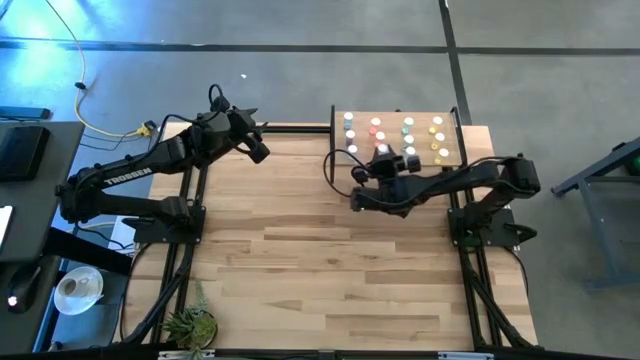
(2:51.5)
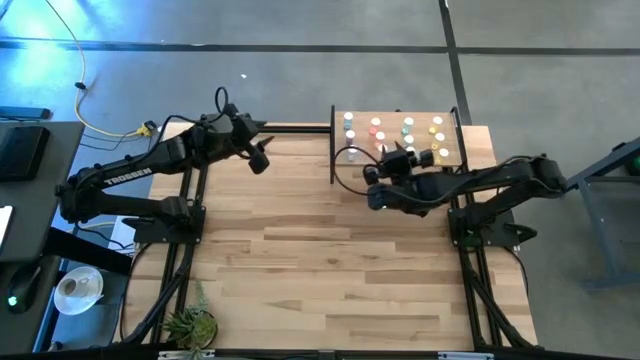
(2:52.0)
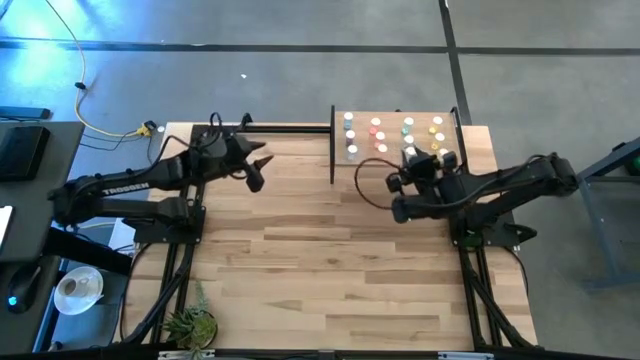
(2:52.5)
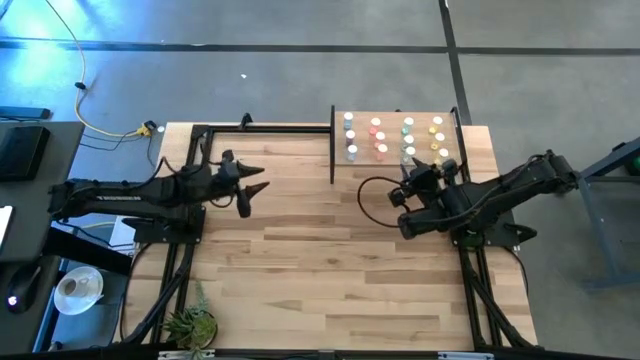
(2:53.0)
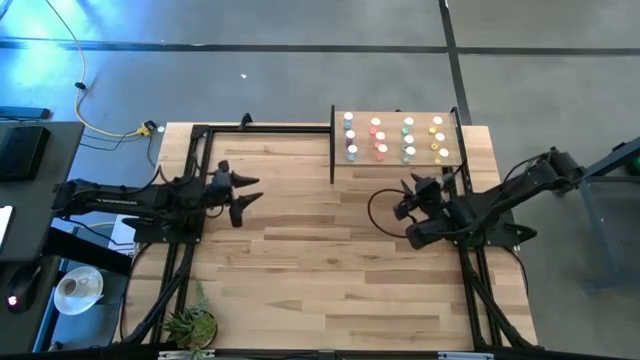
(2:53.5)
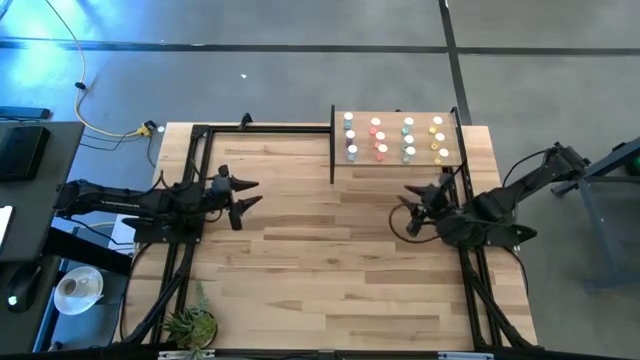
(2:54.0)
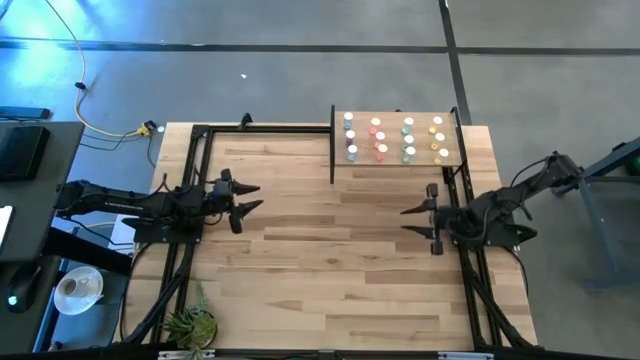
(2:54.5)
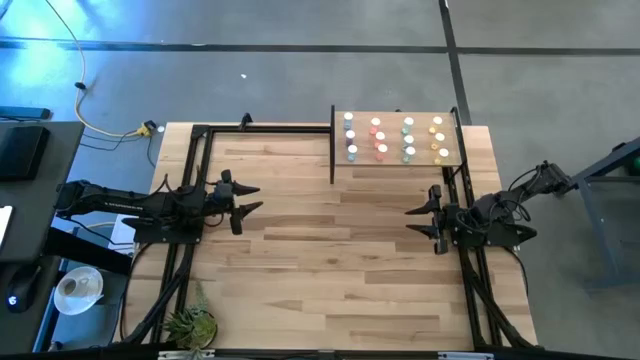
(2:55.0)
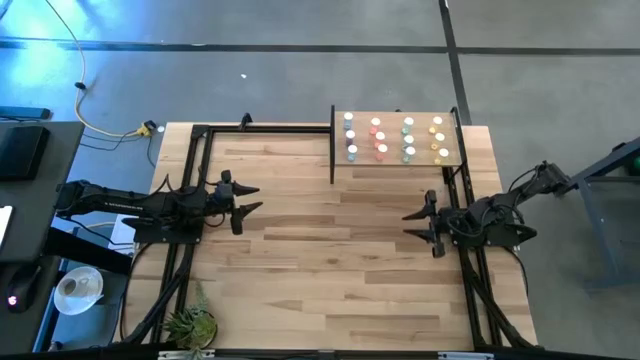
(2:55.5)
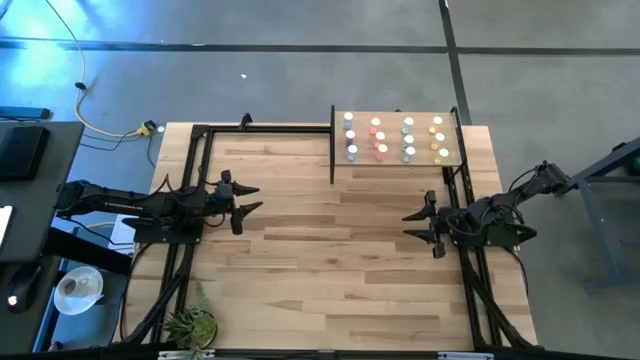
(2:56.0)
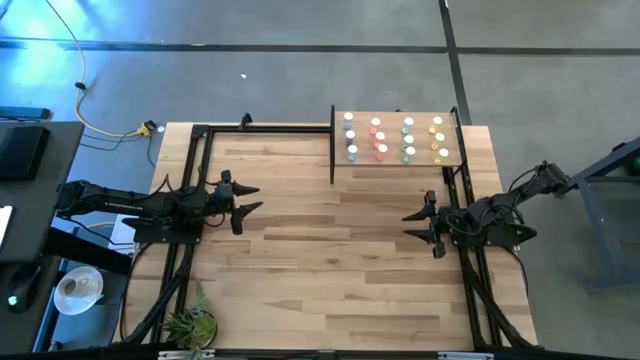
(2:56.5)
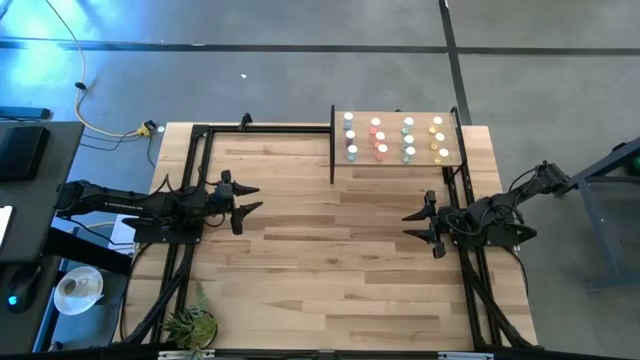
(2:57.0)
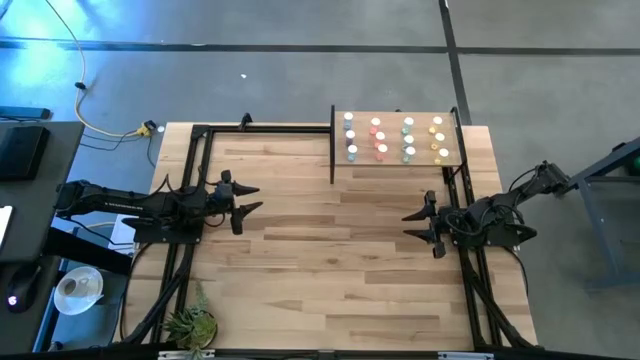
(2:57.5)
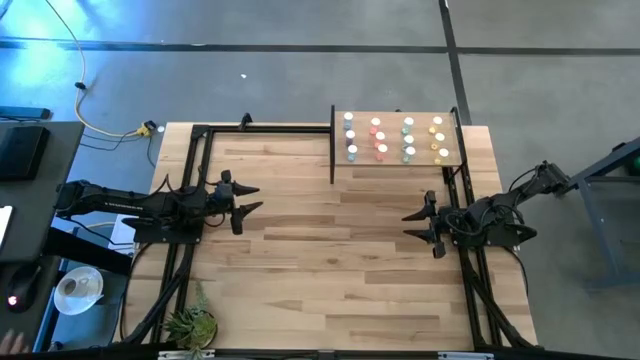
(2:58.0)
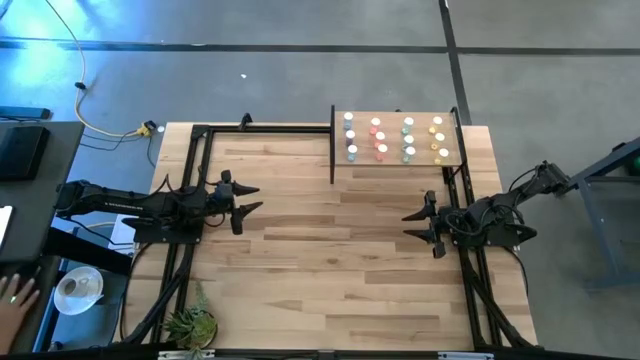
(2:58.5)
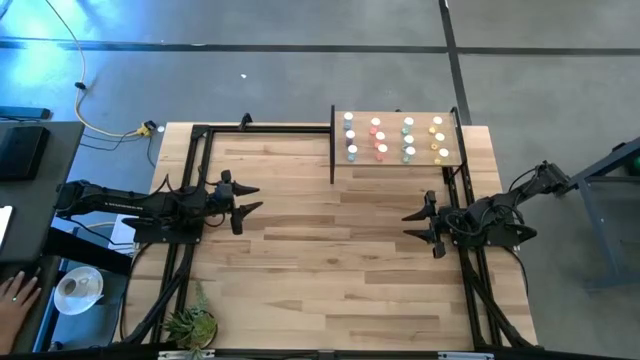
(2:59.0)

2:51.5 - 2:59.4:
Task: Pick and place medicine bottles onto shelf by color
Return to Home Position

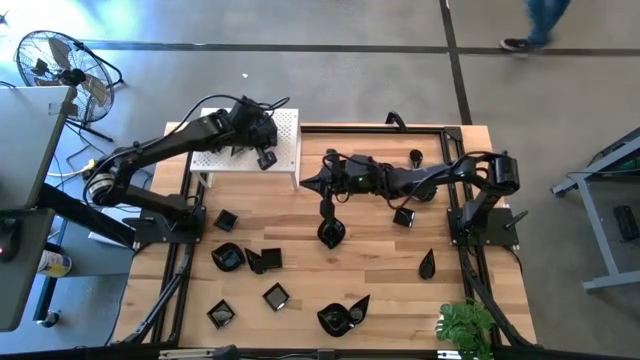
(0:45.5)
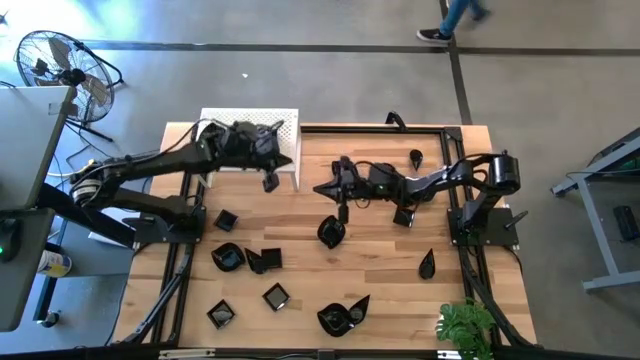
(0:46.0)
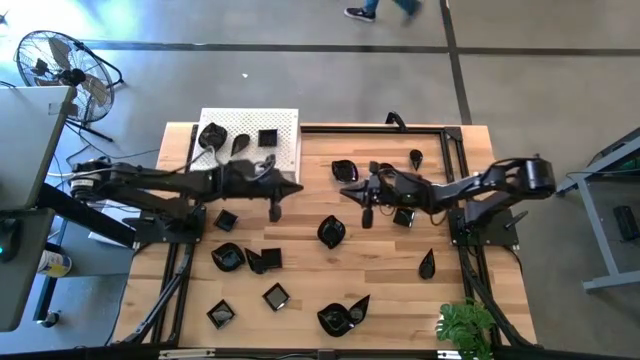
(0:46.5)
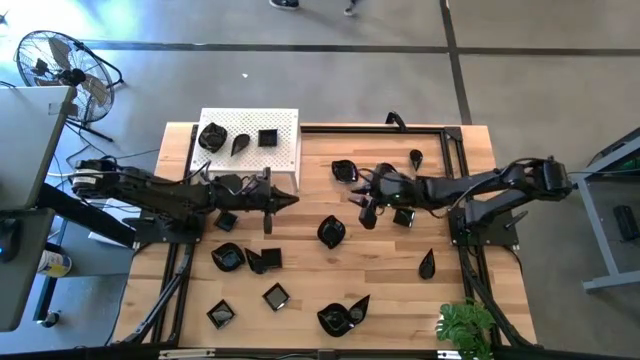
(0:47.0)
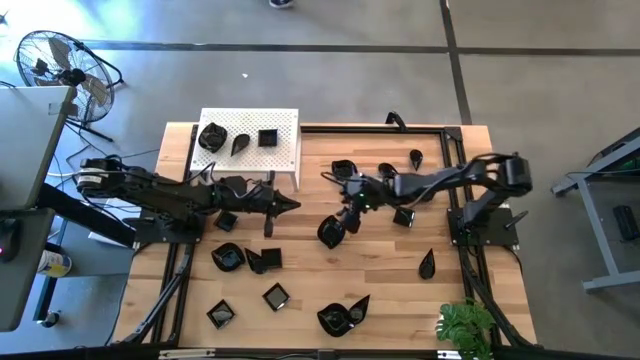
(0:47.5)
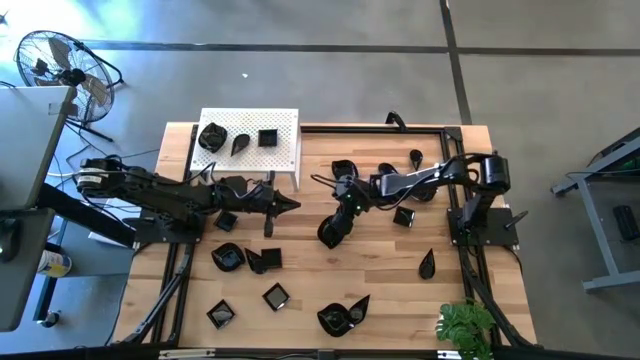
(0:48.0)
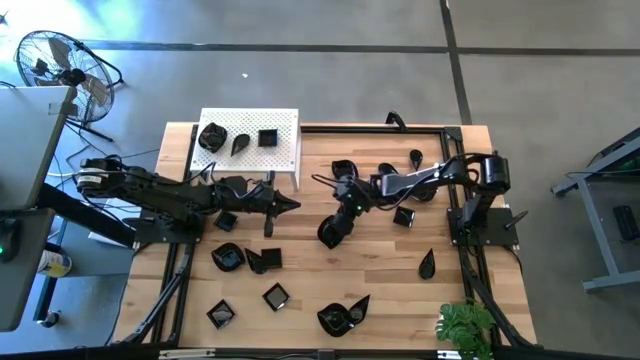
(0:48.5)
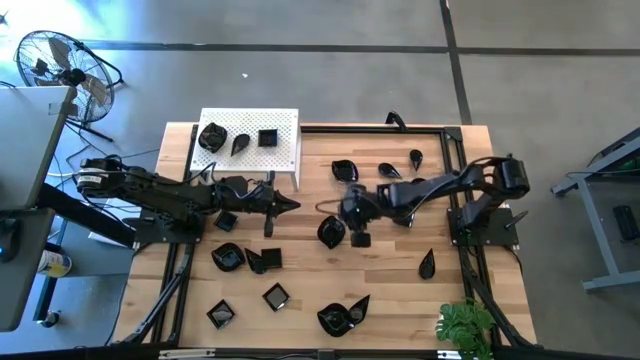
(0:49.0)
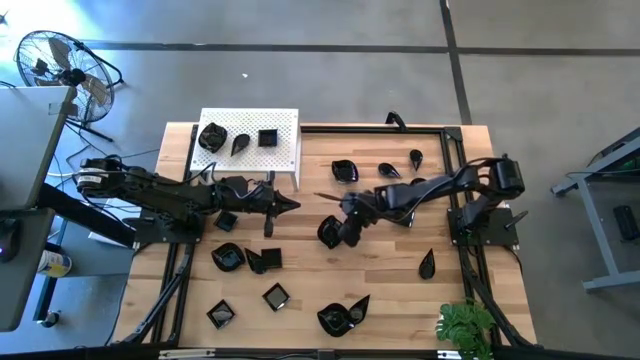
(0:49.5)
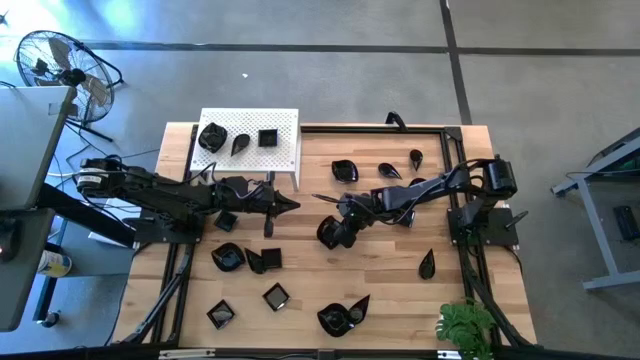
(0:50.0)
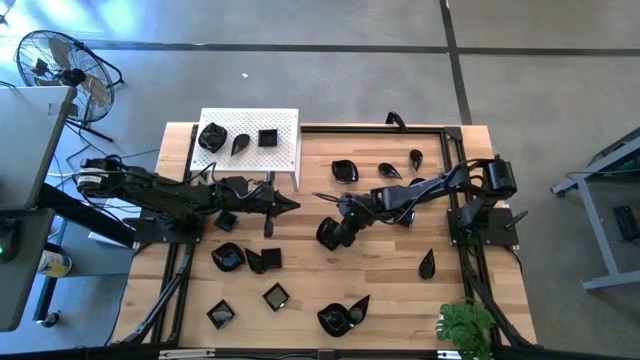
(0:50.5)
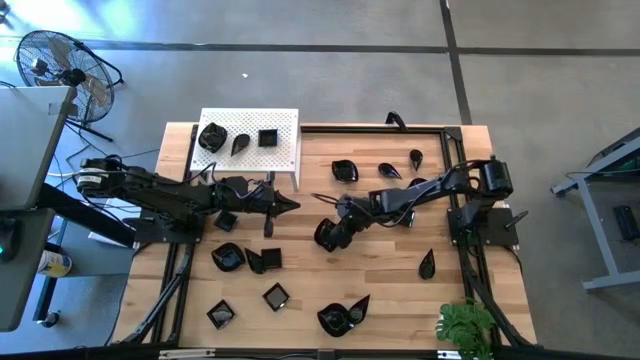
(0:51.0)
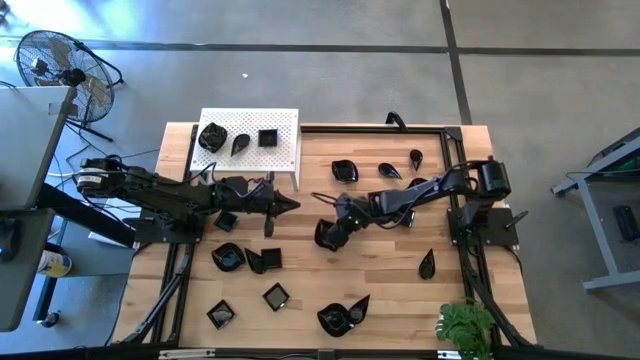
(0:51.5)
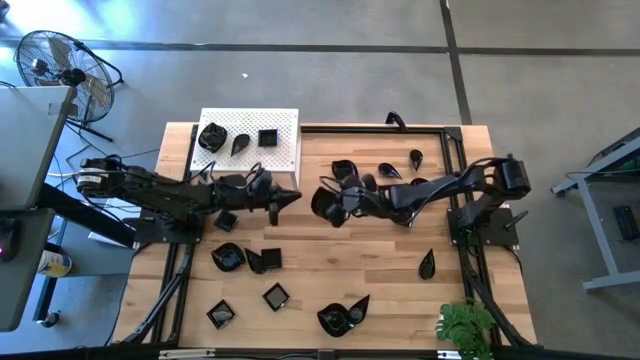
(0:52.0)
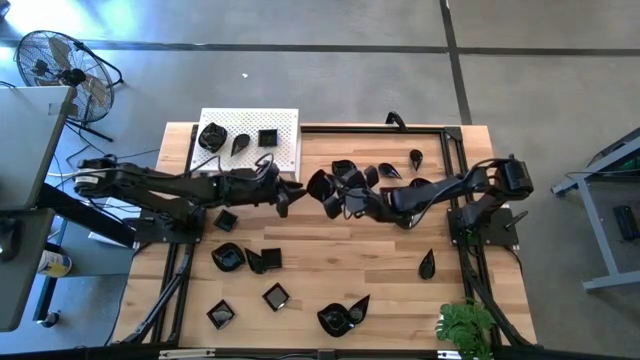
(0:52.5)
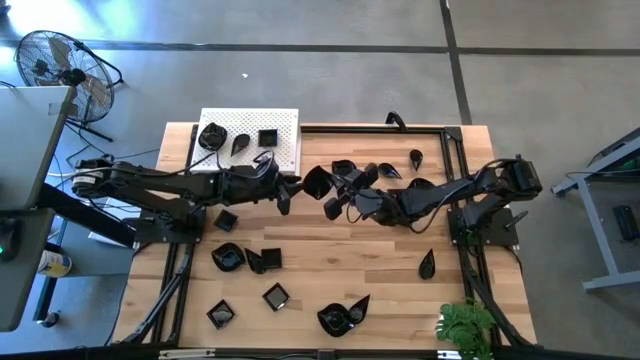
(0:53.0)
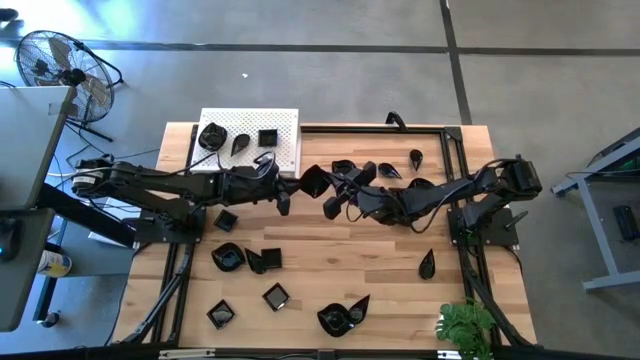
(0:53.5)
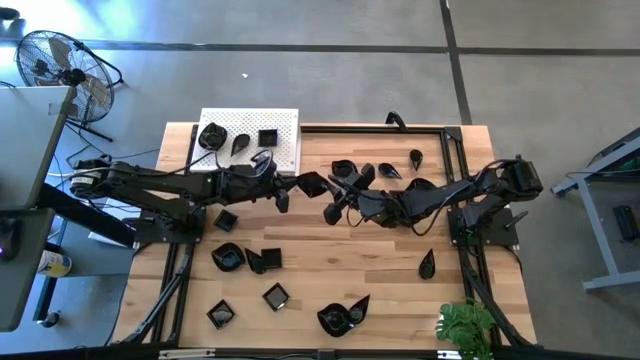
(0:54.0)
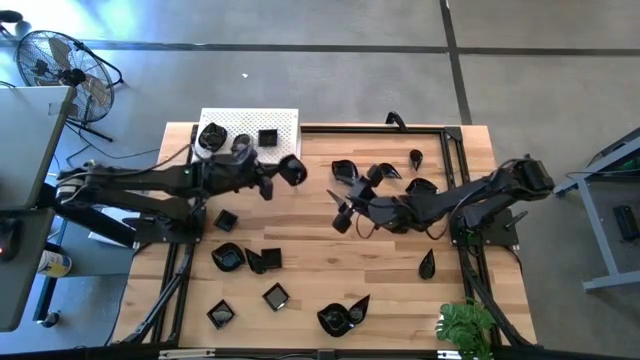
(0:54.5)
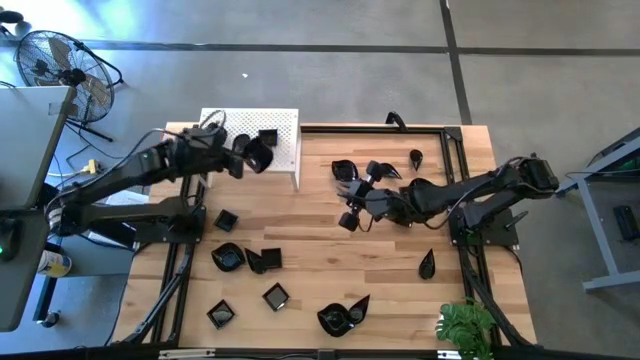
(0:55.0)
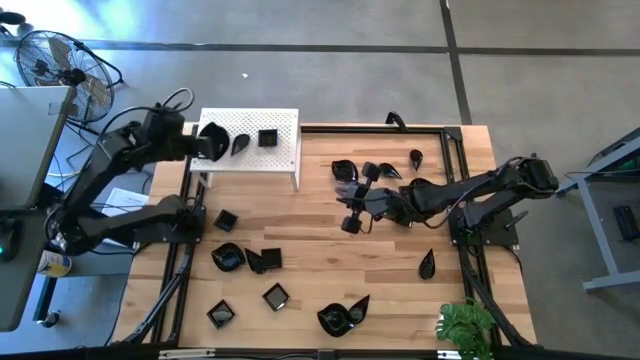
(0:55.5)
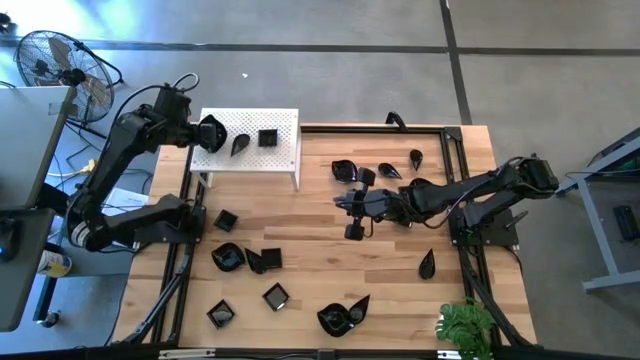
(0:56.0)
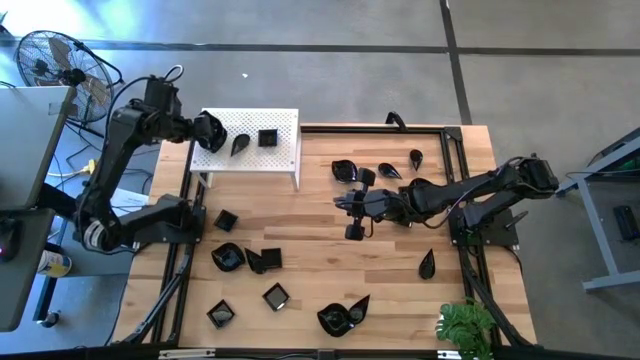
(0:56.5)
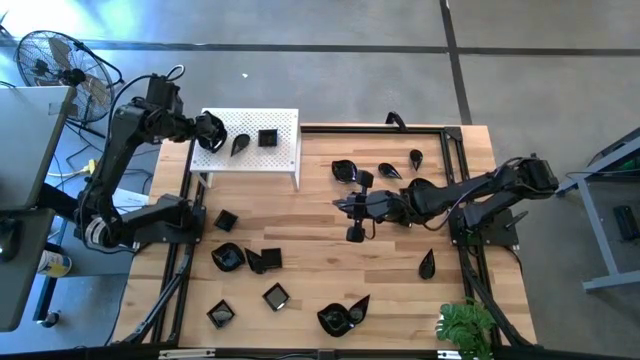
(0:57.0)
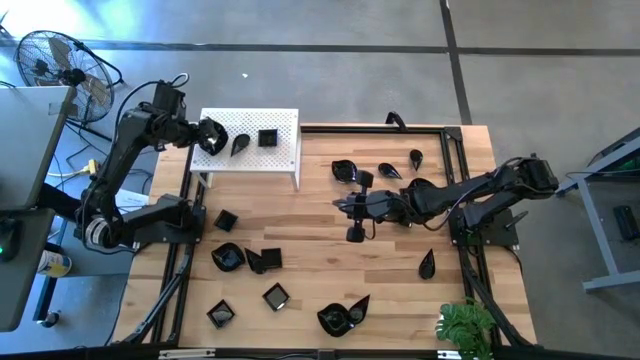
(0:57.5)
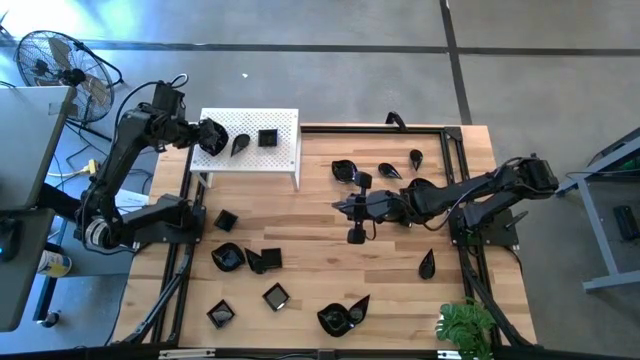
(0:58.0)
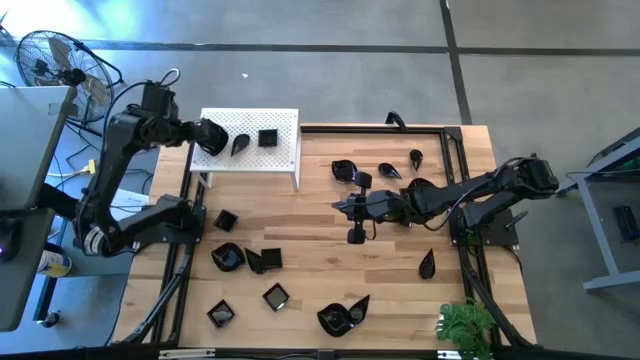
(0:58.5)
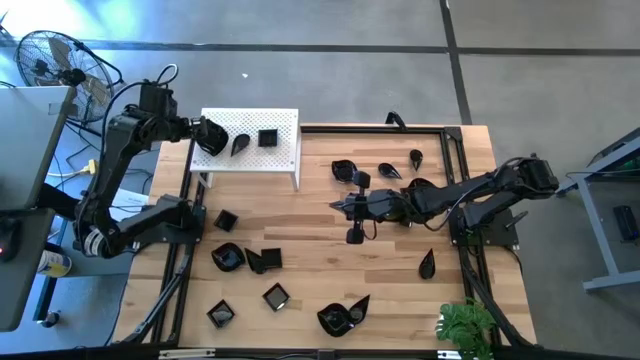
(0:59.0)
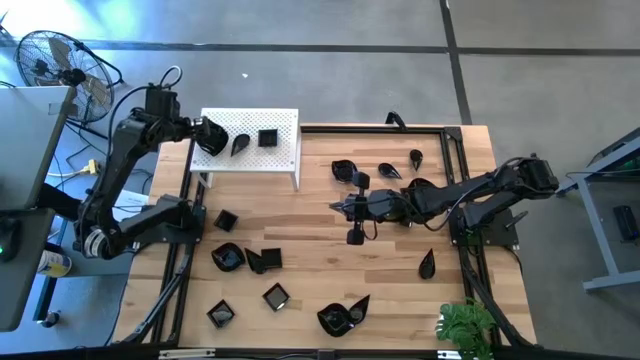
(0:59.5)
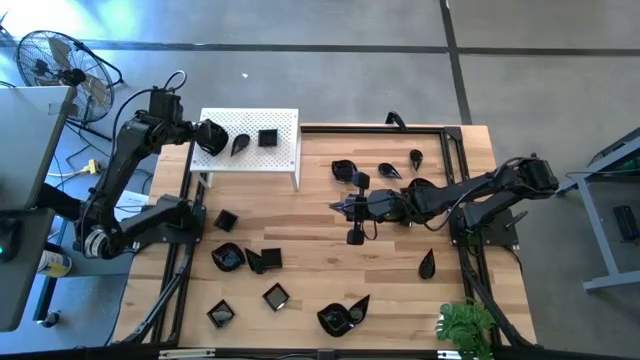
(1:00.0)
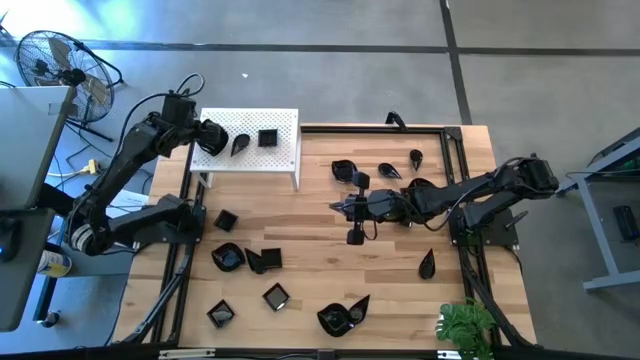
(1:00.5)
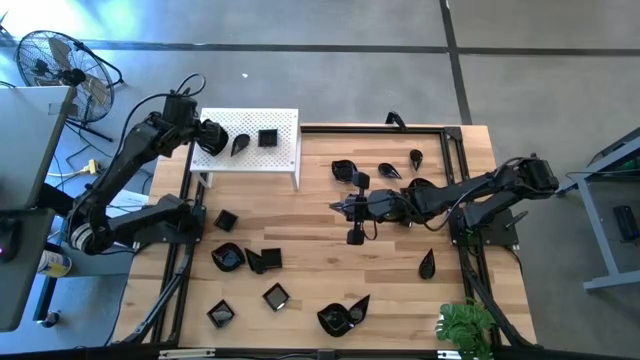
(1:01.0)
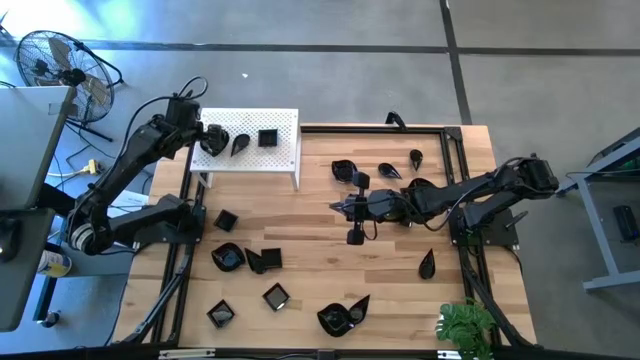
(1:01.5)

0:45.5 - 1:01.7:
Task: Pick & Place Mini shaped plates
Stack the black leaf shaped plate on top of the black leaf shaped plate on the shelf
